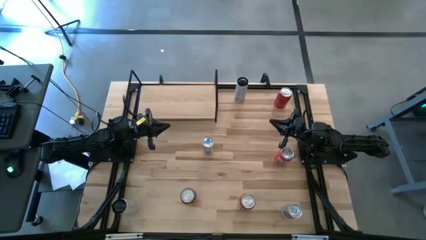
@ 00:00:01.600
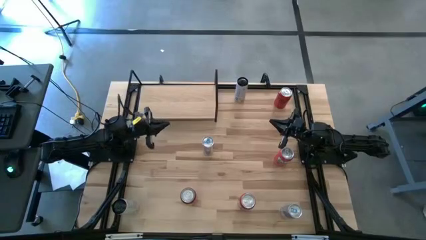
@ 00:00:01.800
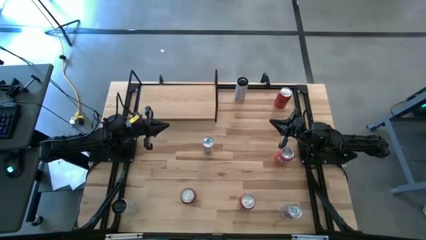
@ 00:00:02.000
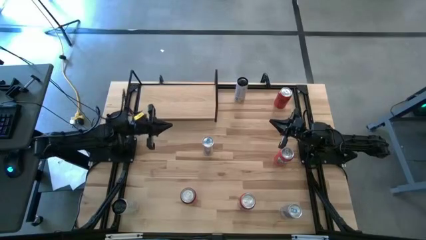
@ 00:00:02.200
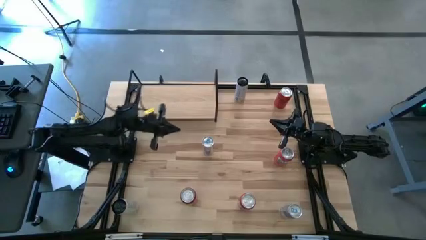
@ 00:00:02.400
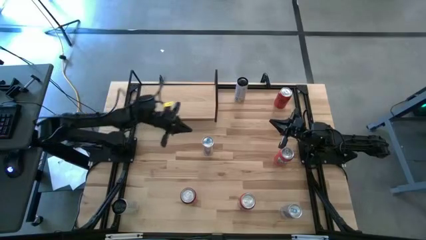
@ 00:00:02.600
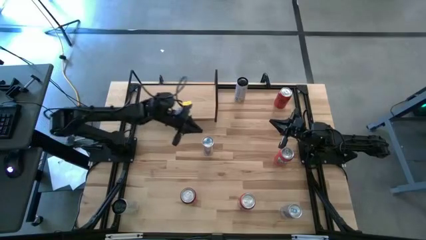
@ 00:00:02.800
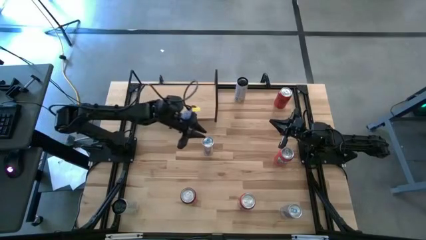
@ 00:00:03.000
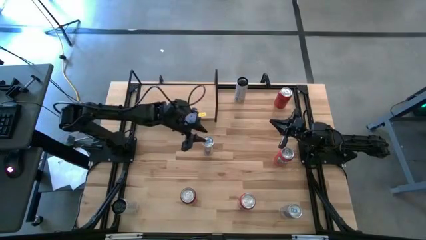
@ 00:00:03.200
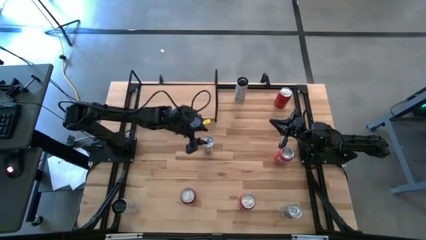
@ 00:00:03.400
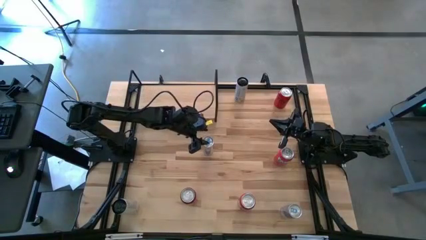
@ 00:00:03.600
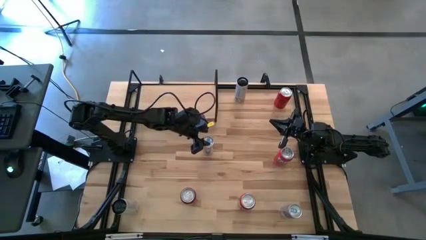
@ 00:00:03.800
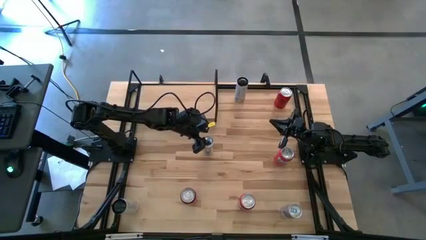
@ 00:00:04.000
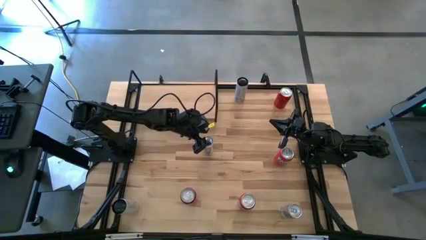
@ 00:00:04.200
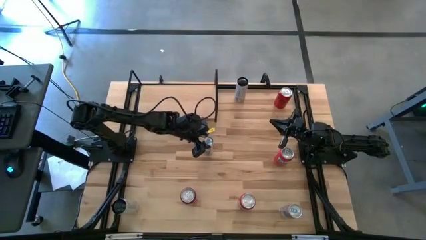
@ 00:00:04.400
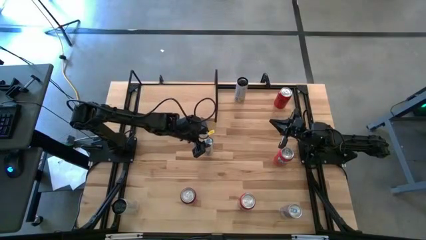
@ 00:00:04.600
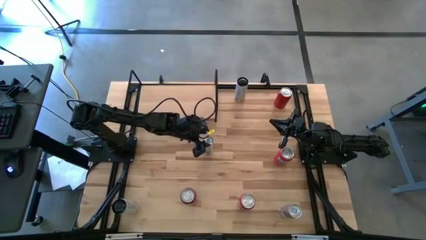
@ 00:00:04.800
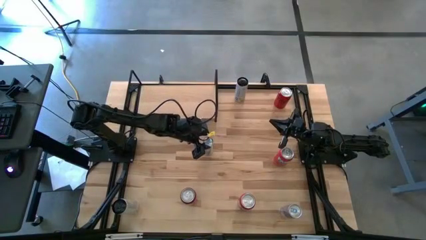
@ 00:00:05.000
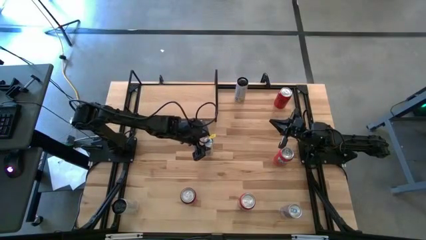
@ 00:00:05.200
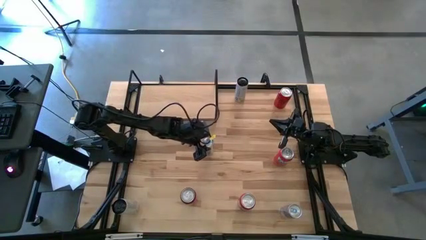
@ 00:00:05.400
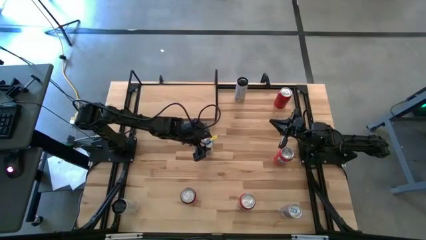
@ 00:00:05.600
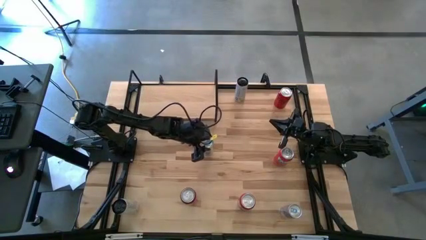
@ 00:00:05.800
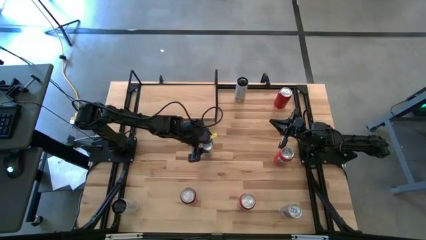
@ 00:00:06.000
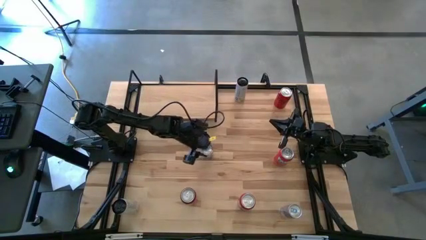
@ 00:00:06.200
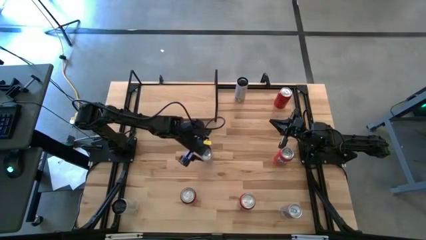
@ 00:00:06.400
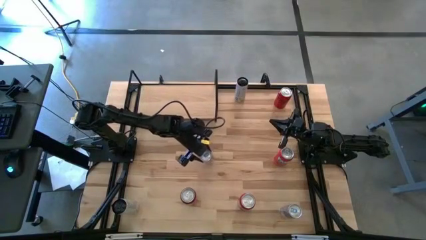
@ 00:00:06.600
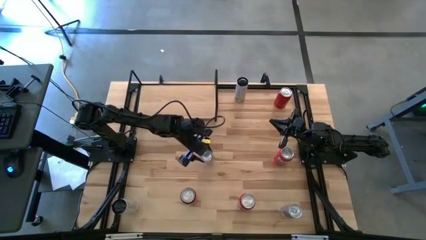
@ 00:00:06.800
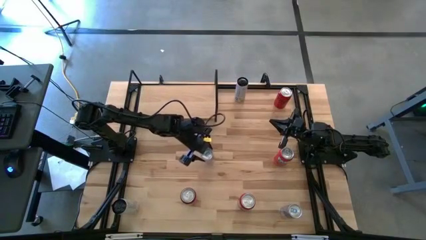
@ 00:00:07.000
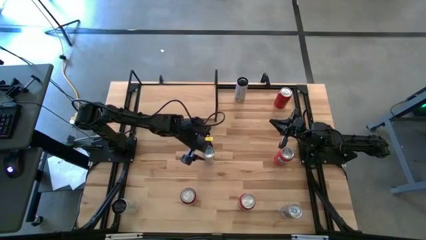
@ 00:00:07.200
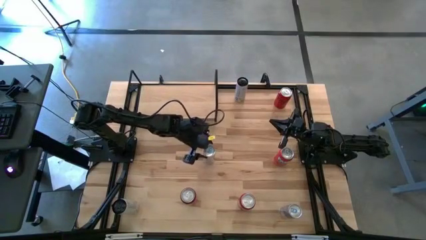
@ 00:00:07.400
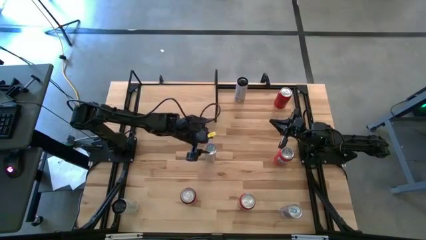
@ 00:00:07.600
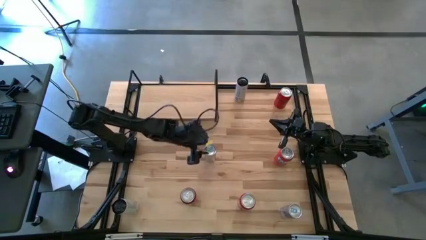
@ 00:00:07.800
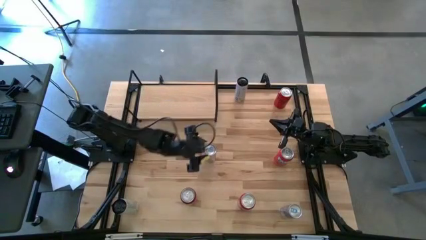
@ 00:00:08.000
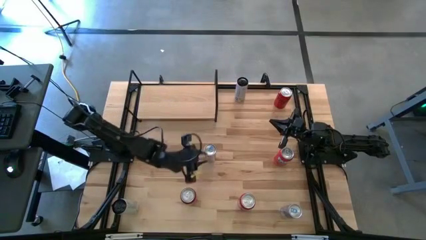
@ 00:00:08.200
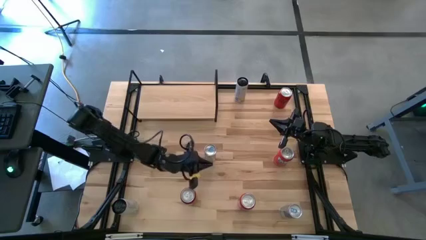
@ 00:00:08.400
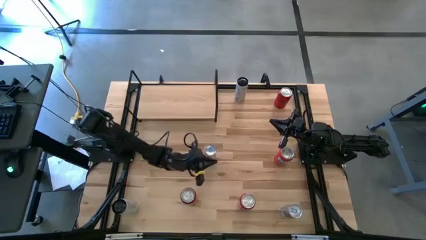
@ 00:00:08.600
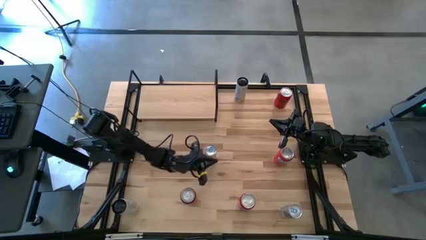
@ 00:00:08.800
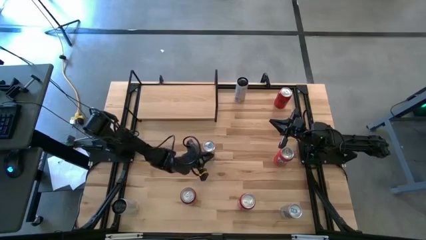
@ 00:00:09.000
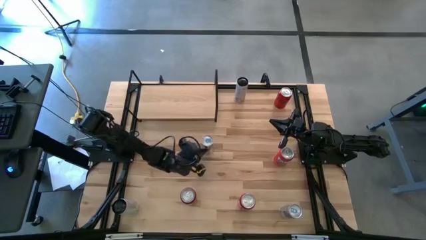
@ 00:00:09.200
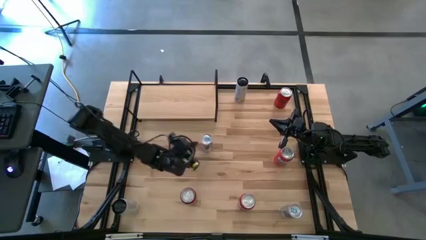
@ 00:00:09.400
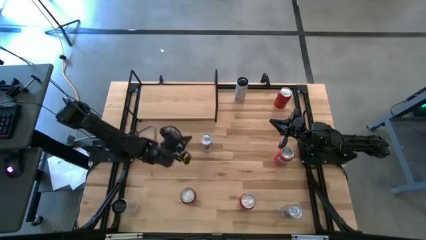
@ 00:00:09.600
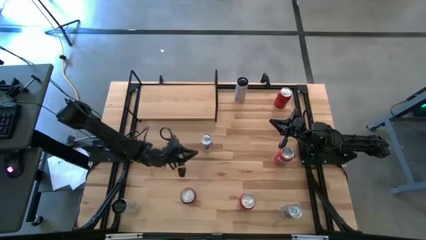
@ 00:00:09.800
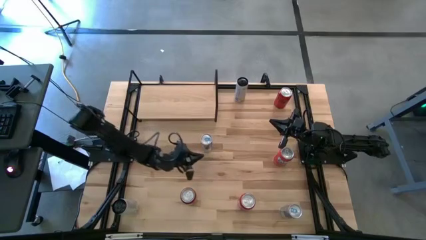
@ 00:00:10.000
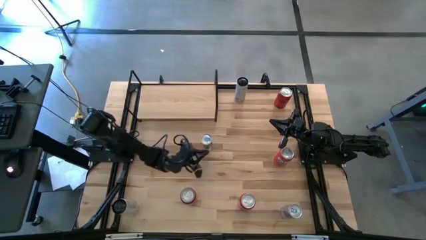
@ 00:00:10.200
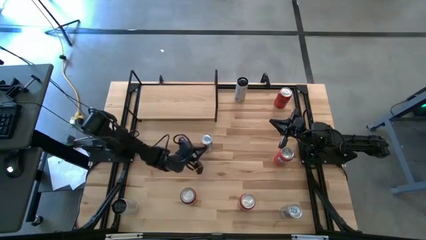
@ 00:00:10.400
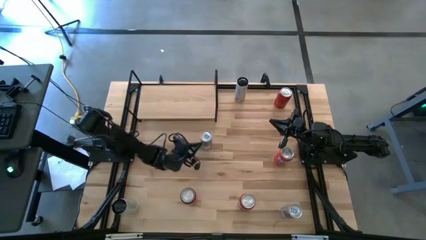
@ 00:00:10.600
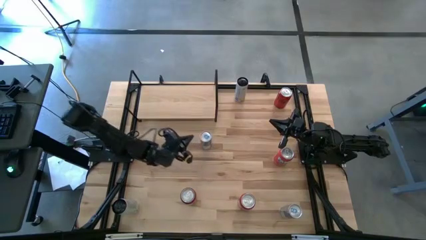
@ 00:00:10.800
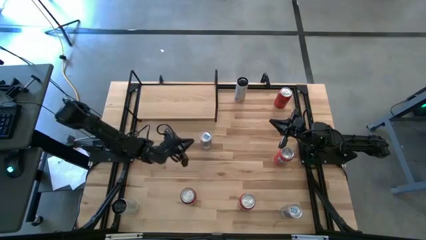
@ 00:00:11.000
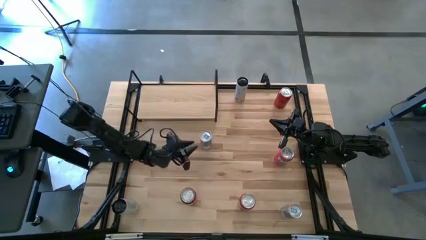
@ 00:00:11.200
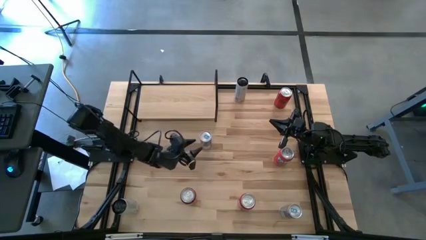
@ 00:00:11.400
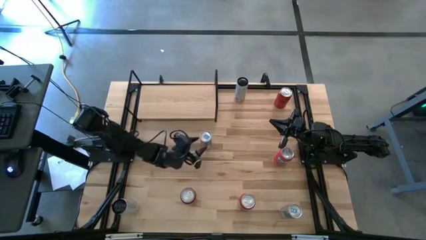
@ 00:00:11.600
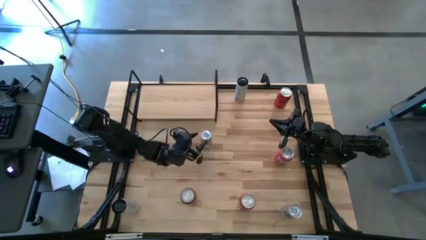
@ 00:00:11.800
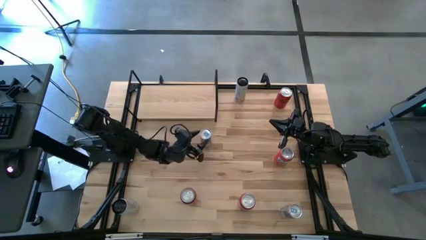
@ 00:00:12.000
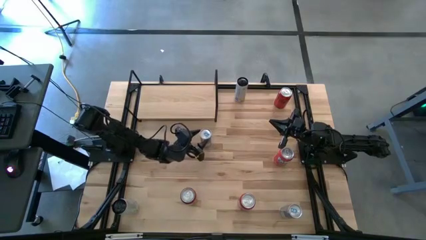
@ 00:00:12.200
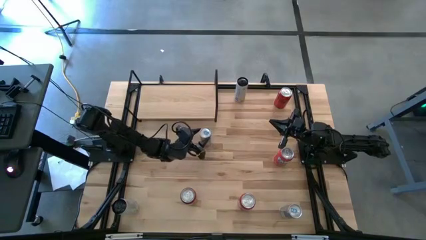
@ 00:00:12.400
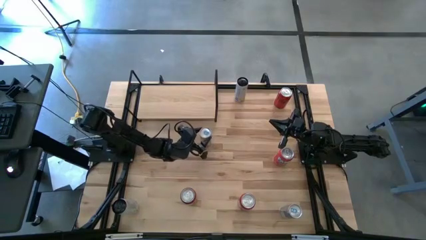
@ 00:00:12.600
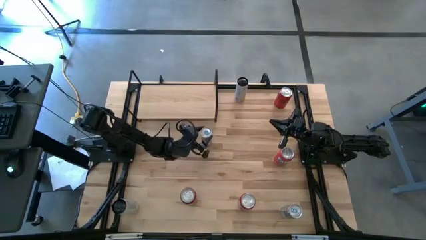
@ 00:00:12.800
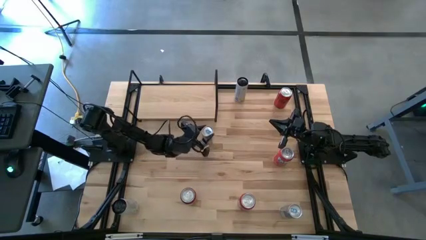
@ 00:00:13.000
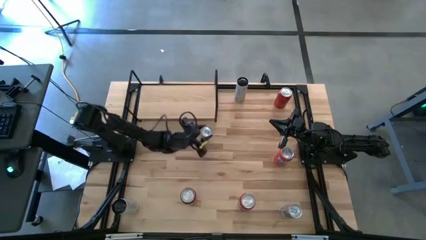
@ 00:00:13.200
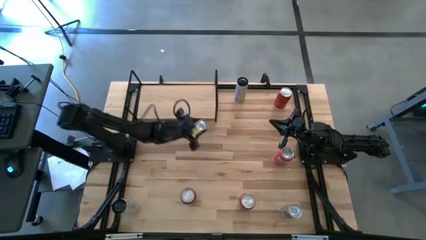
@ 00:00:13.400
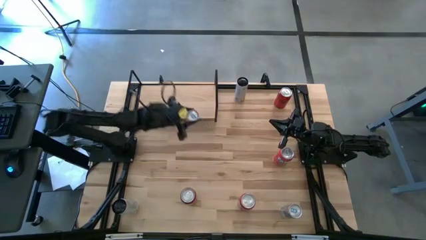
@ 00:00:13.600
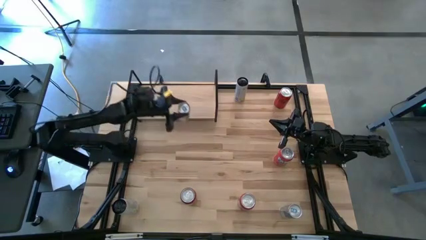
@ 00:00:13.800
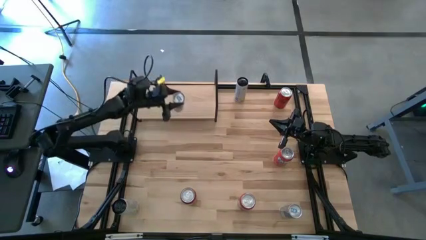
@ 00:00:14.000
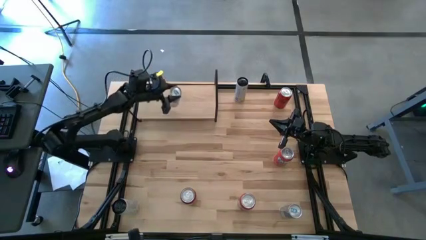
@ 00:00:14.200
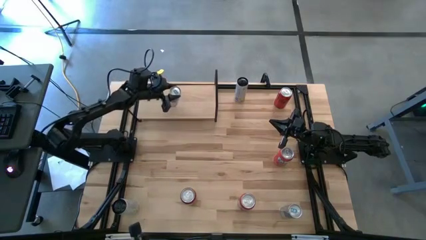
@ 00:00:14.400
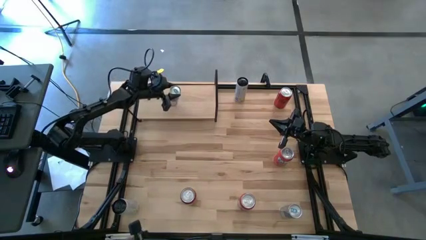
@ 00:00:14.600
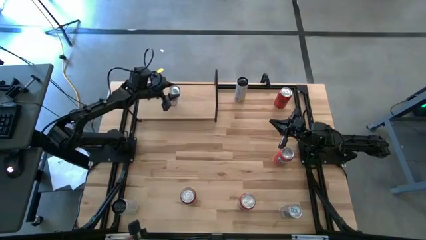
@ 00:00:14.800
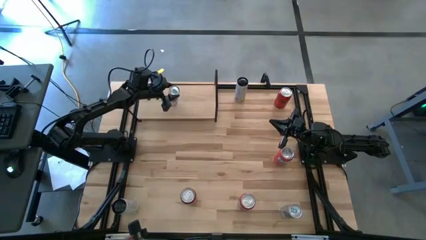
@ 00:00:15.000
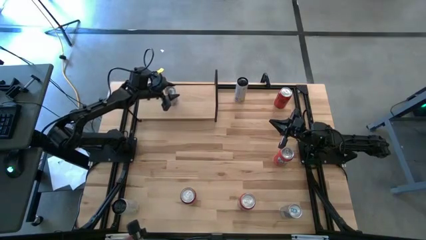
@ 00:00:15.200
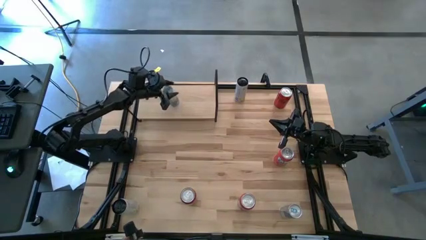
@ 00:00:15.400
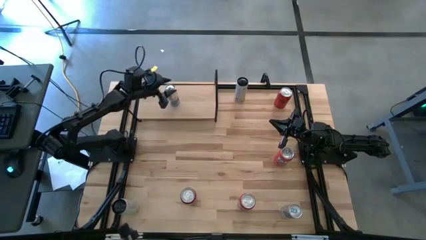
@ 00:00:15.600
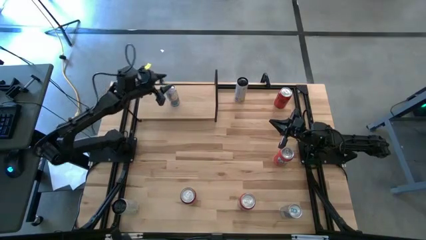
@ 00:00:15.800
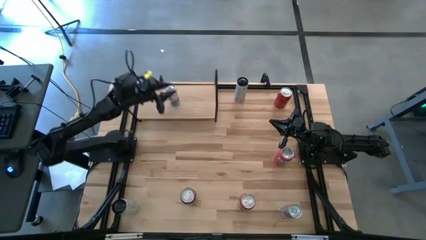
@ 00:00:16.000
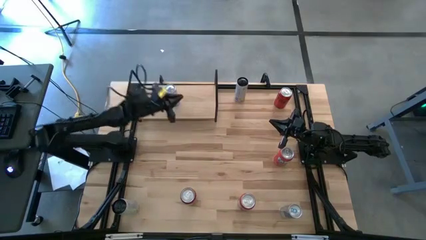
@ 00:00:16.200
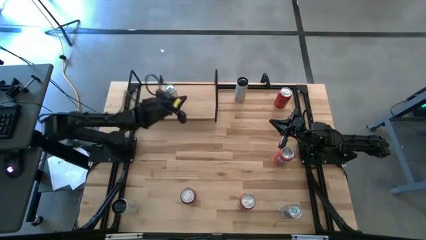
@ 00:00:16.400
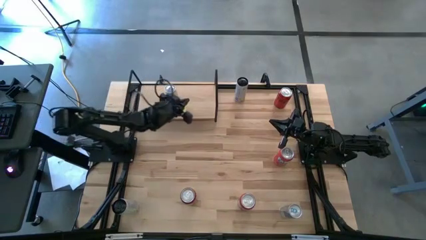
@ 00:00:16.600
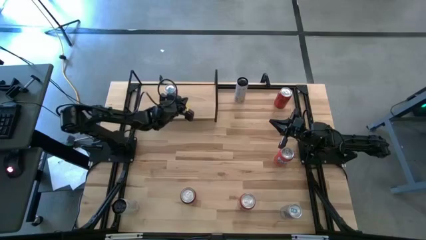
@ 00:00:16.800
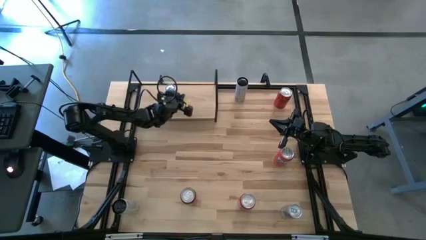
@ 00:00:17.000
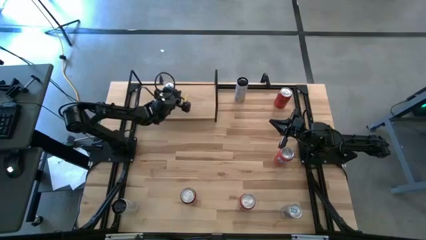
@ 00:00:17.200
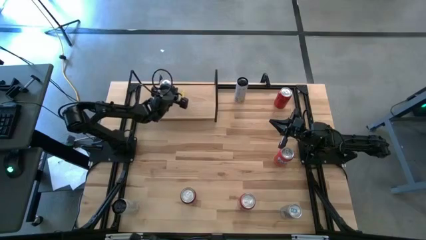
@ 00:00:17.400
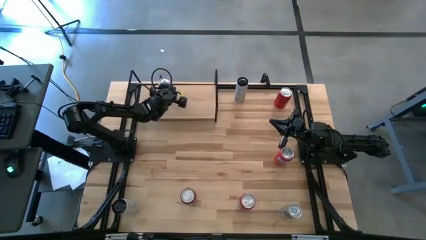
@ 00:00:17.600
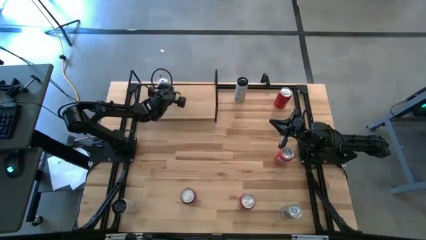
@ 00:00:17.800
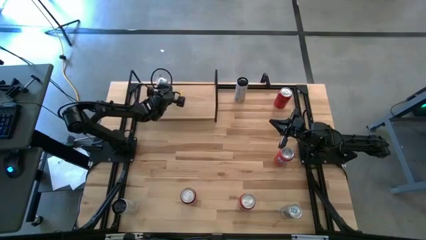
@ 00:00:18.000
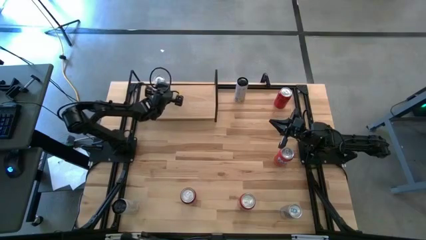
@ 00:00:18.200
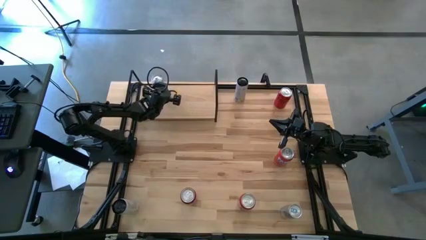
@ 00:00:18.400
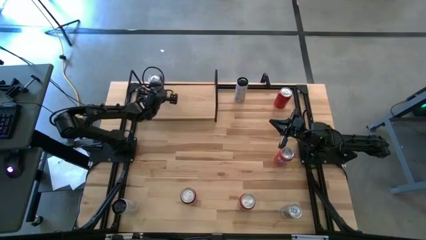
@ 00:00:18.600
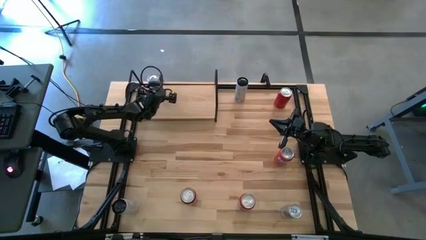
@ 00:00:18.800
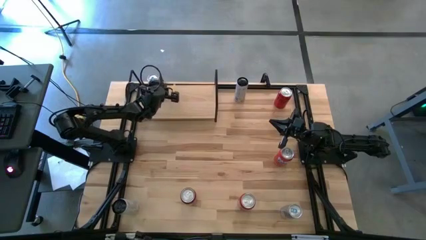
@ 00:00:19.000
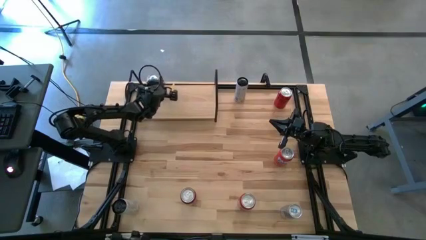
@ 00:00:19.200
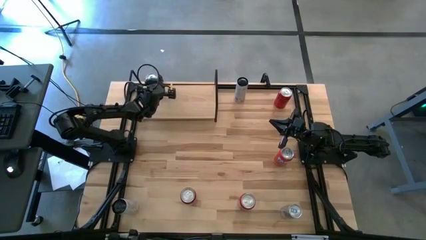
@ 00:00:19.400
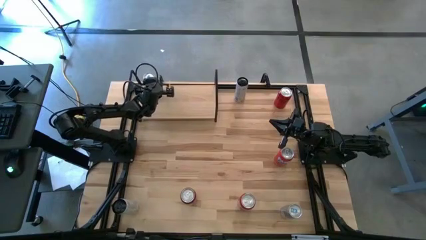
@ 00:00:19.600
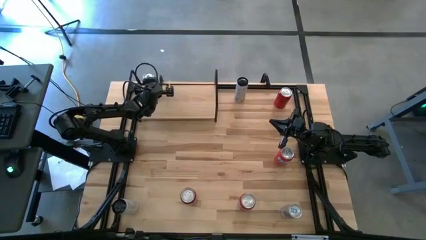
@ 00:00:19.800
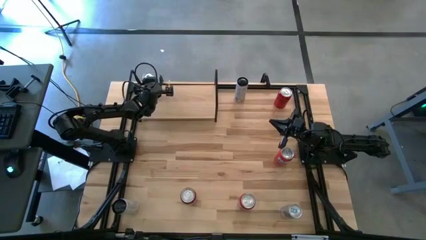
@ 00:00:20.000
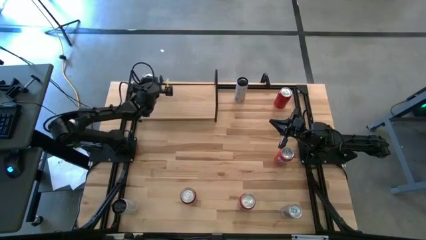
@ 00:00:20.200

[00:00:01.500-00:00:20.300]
Task: Place canned beverage on shelf
Put the top blue soda can on the shelf
